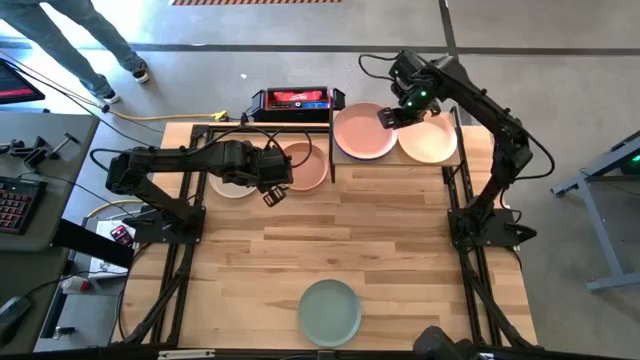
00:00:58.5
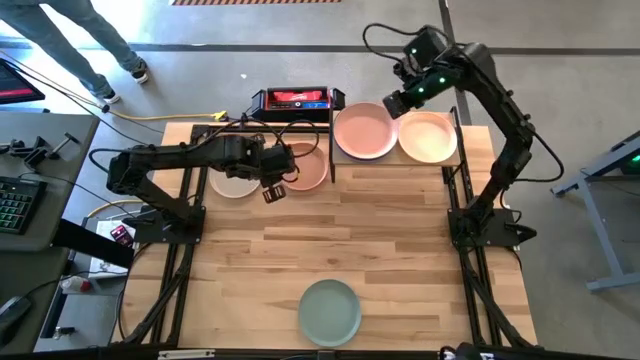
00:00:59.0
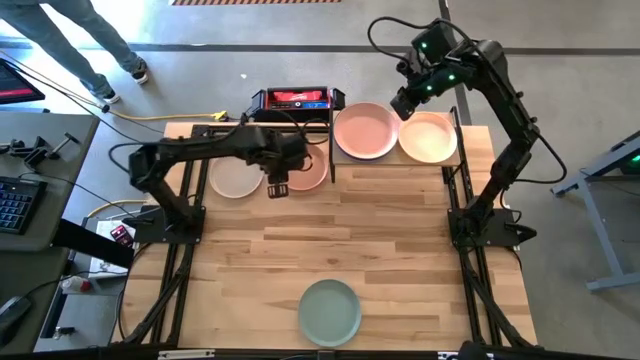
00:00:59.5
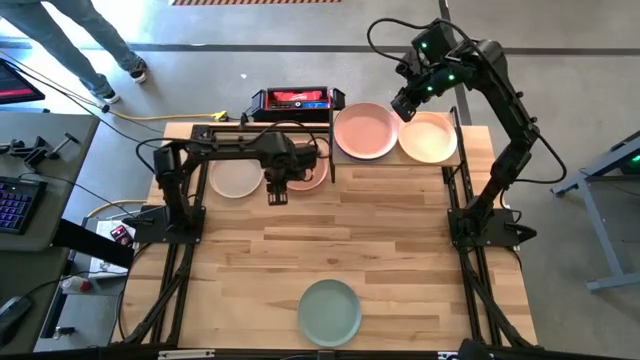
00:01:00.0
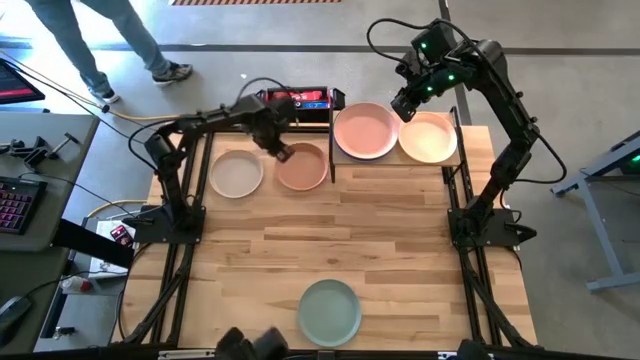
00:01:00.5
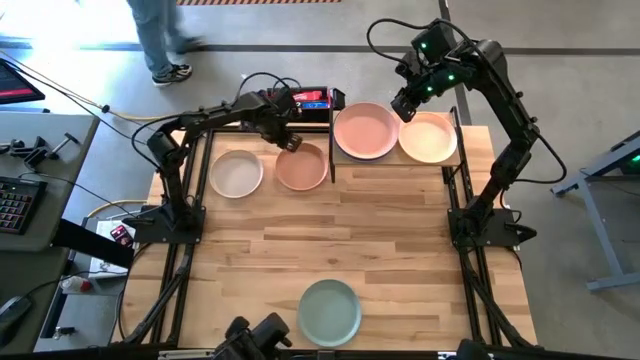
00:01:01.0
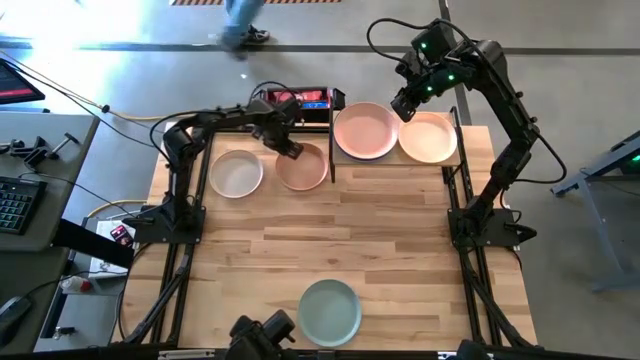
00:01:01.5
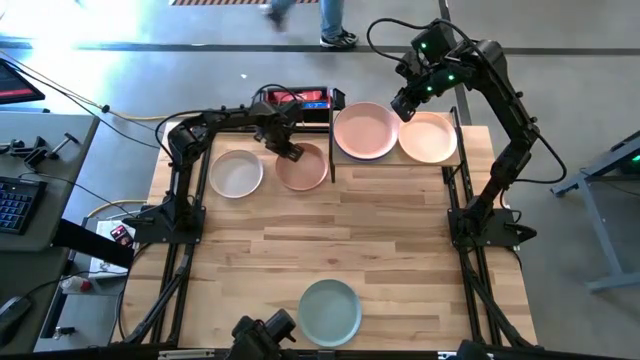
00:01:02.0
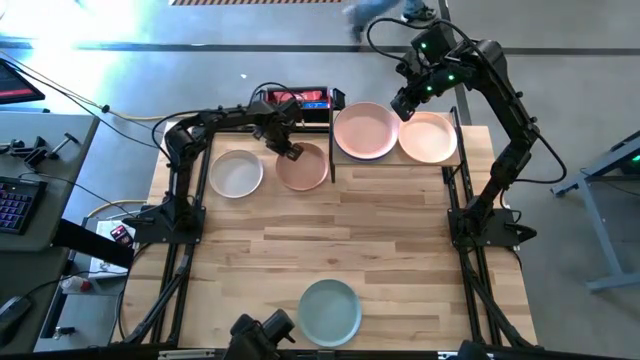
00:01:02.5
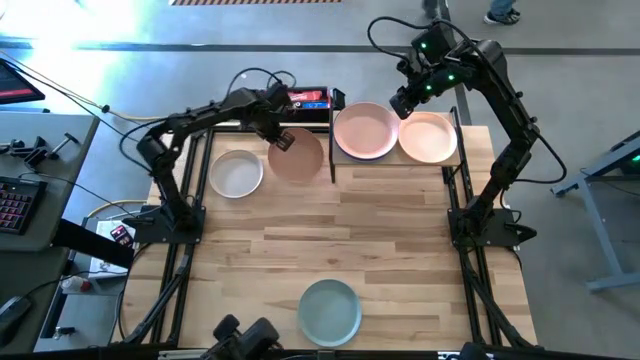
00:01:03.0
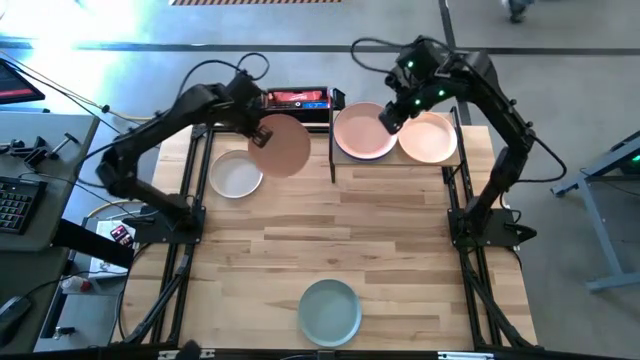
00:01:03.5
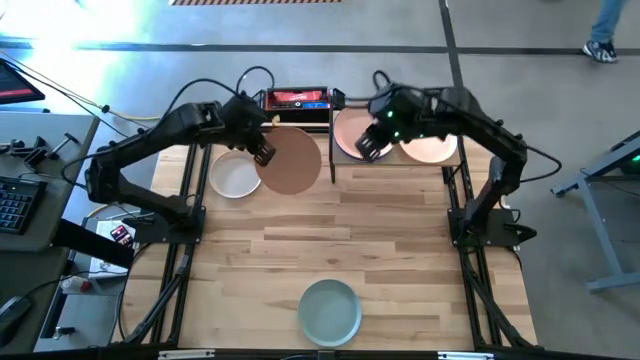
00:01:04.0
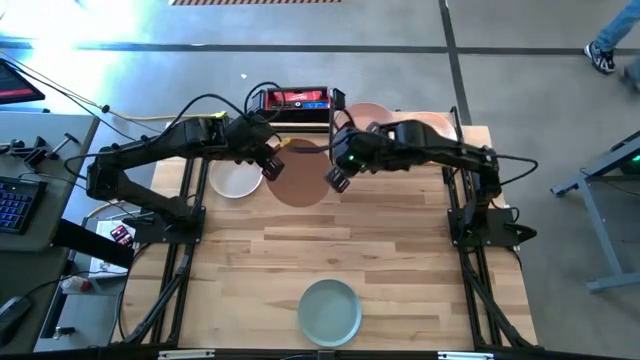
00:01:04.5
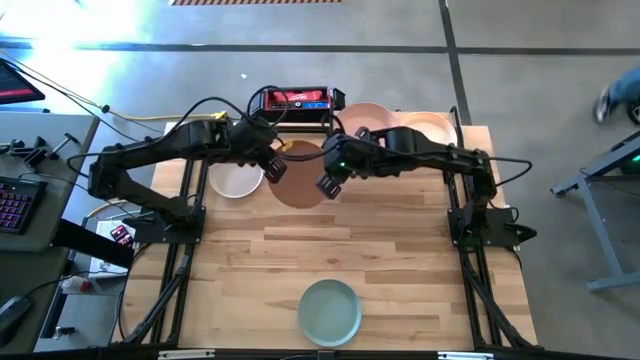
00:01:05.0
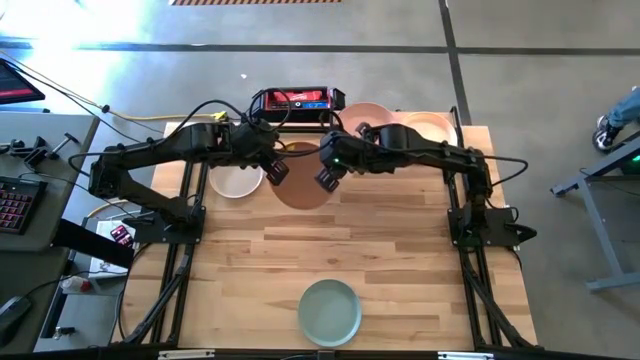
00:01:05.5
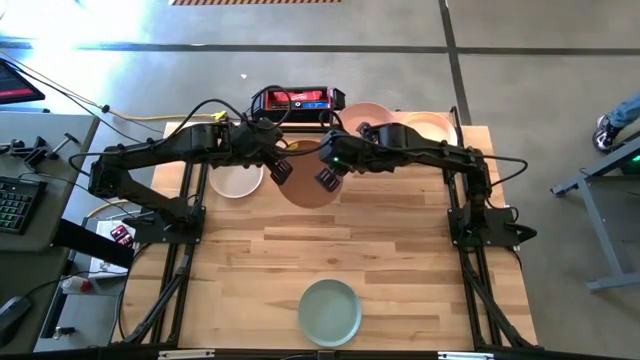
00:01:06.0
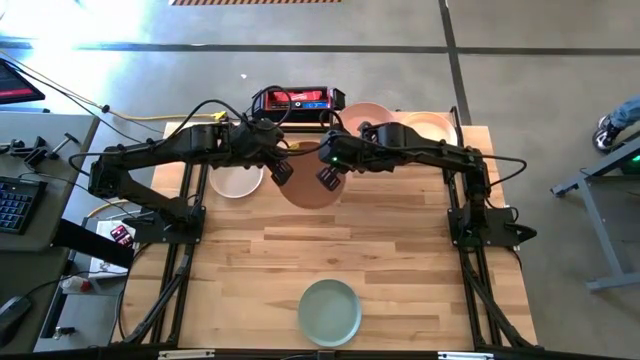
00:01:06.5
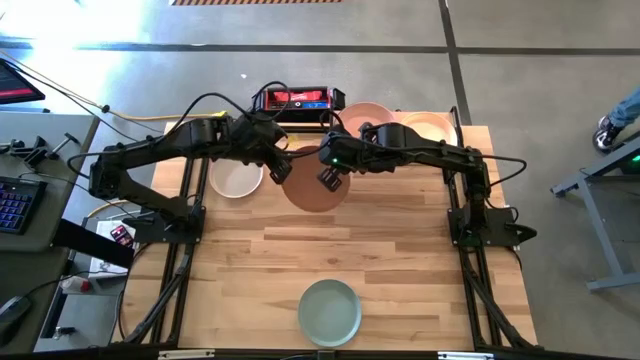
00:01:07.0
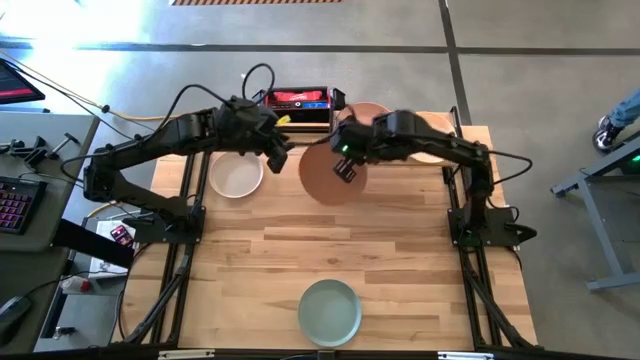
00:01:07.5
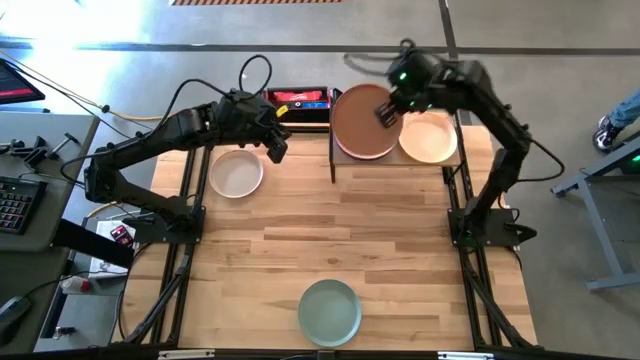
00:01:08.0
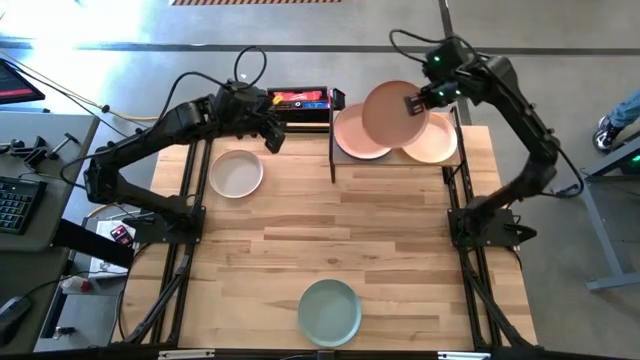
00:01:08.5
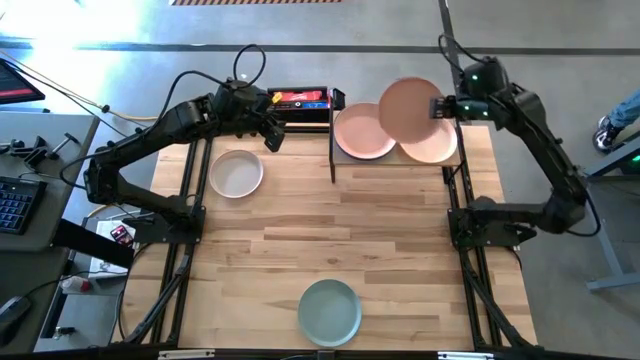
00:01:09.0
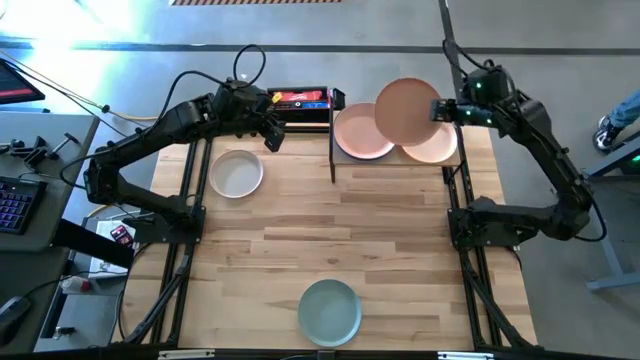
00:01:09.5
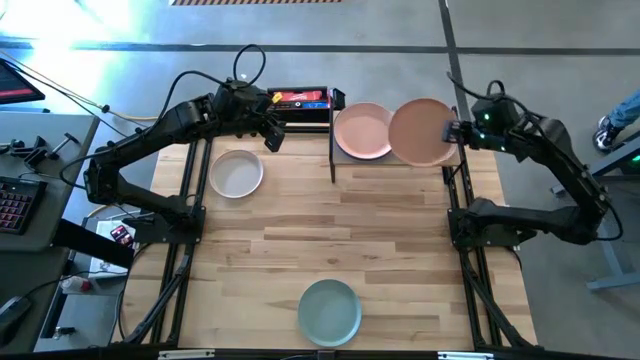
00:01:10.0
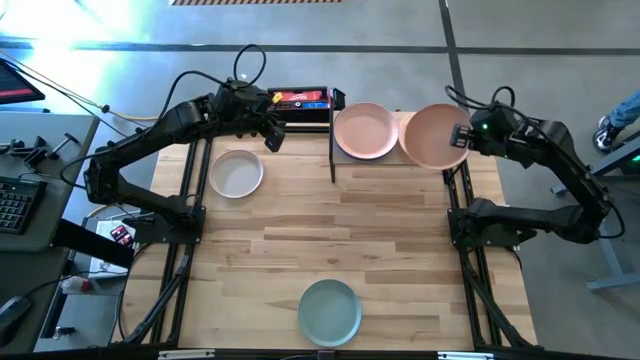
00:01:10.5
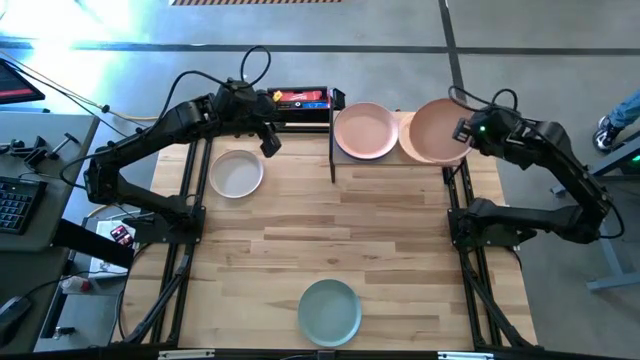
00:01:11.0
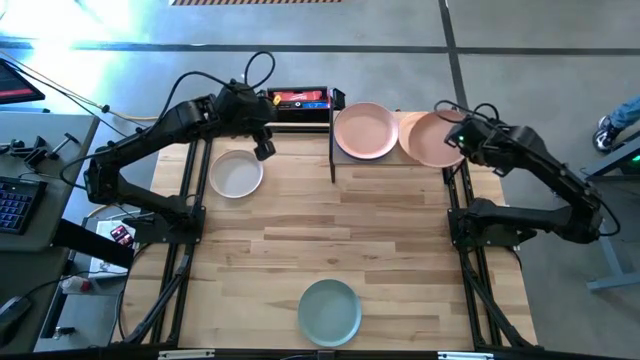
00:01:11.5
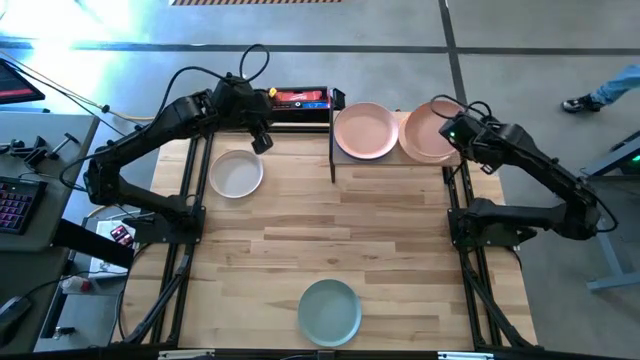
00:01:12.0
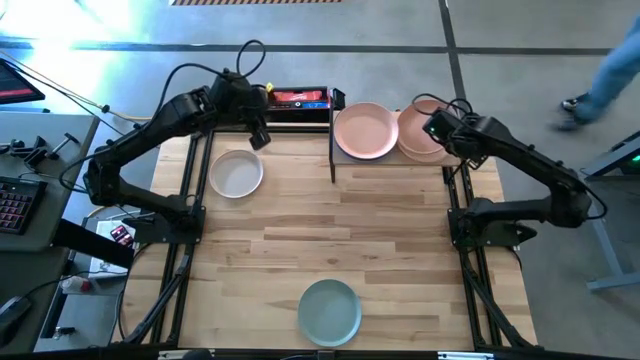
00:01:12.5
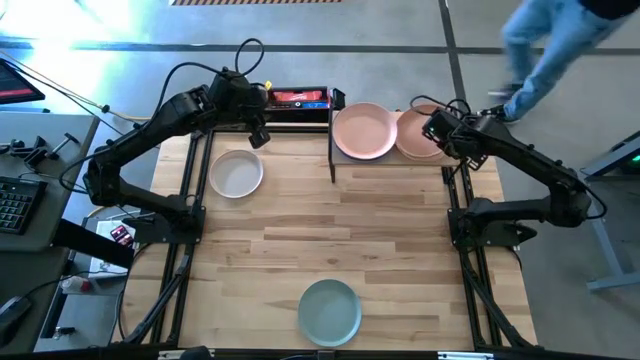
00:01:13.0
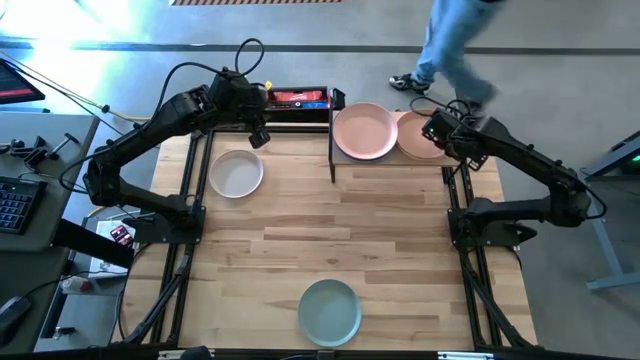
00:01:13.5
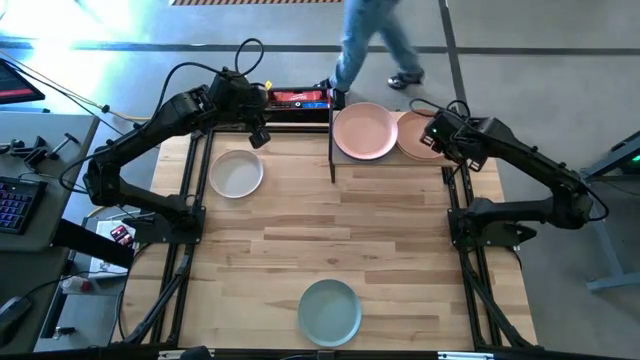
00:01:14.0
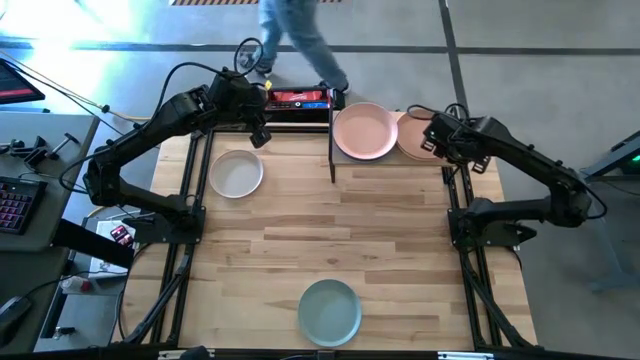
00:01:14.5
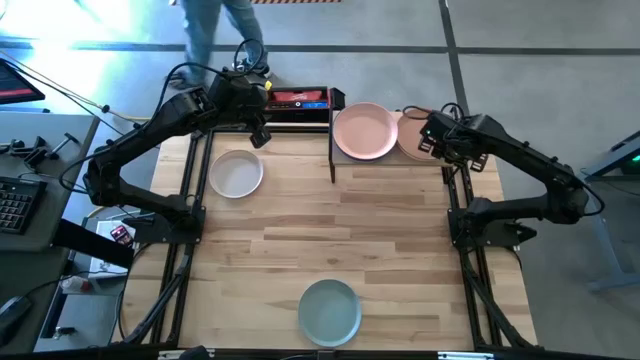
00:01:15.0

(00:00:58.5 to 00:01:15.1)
Task: Place and stack plates onto a shelf
Stack the orange plate on top of the light orange plate on the shelf

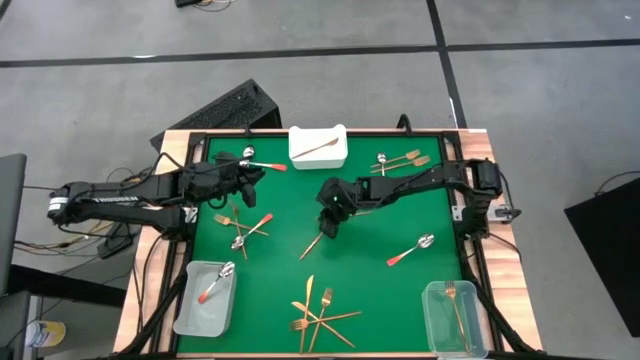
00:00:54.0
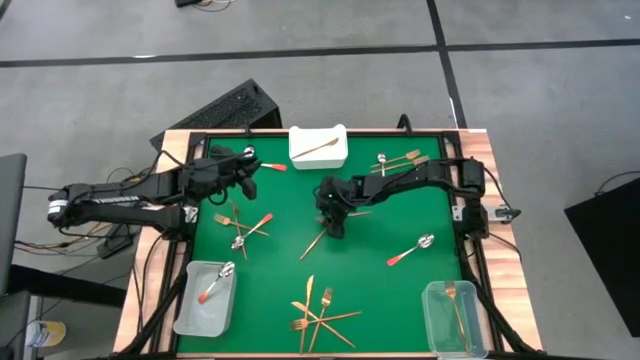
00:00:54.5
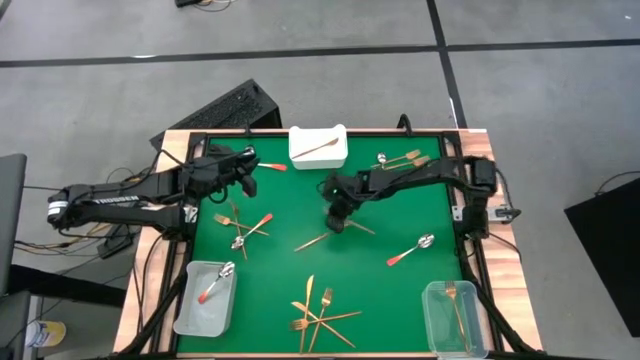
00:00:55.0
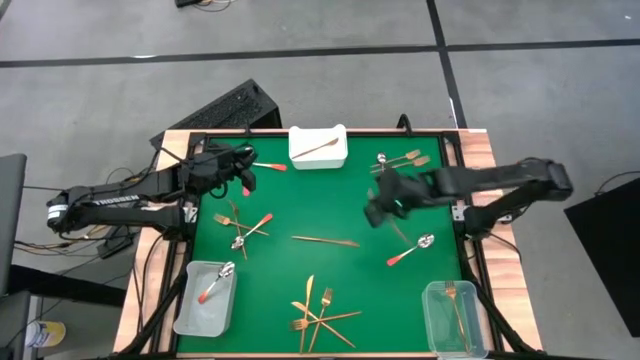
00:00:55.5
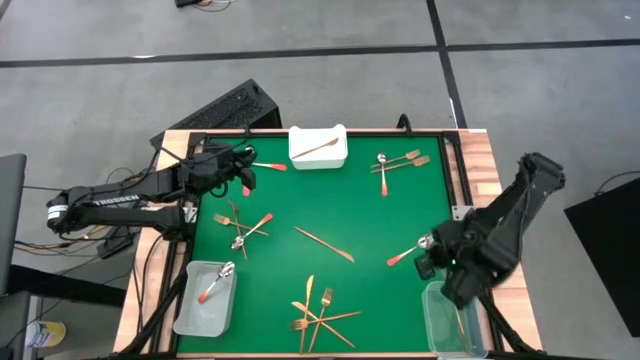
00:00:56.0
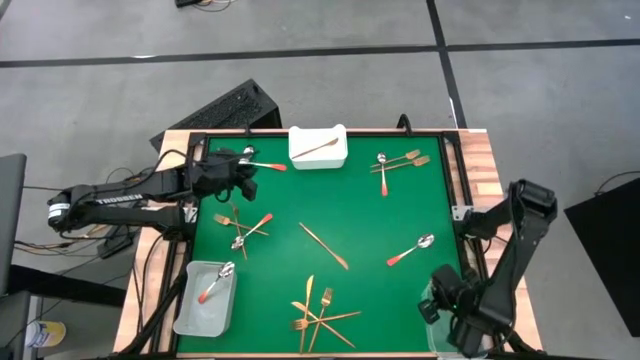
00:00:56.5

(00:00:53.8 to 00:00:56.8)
Task: Sort silverware by color (type)
Put the gold fork into the transparent bin
